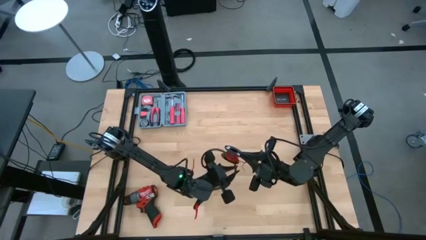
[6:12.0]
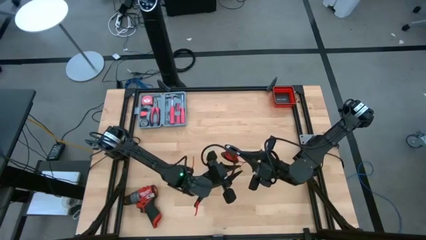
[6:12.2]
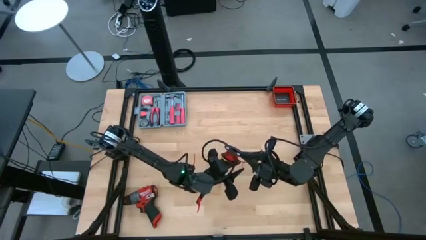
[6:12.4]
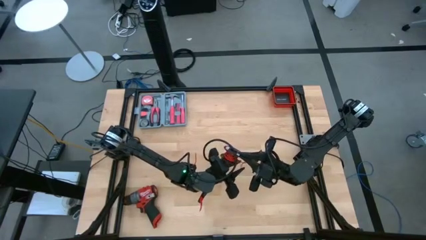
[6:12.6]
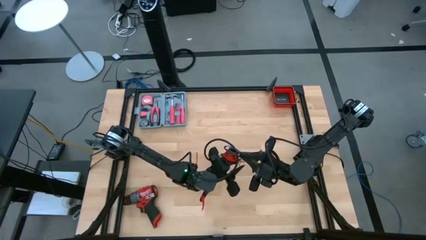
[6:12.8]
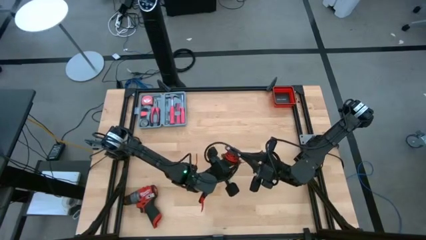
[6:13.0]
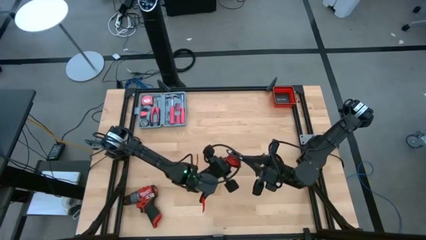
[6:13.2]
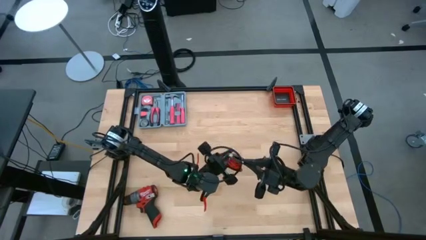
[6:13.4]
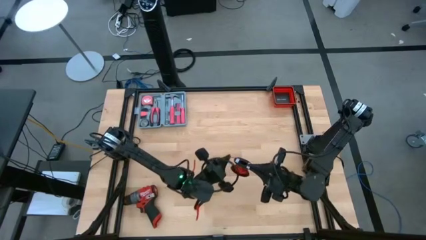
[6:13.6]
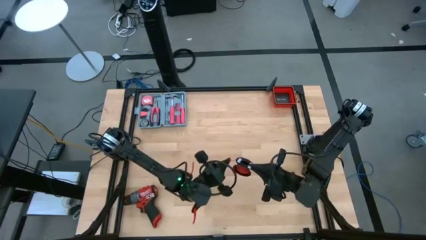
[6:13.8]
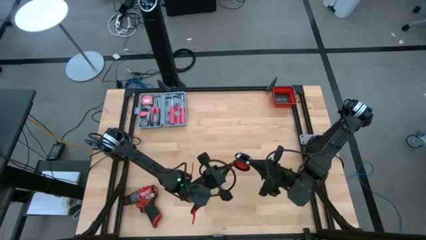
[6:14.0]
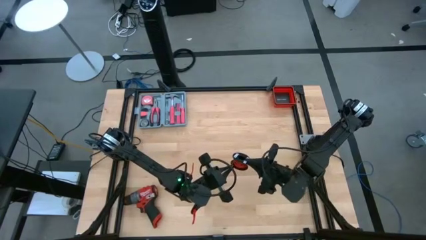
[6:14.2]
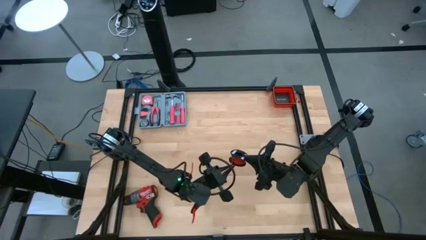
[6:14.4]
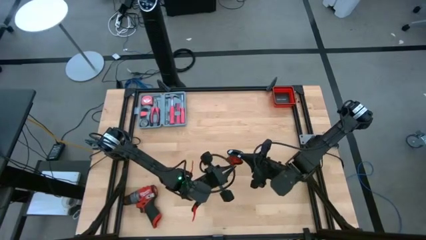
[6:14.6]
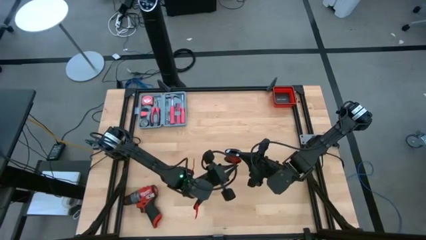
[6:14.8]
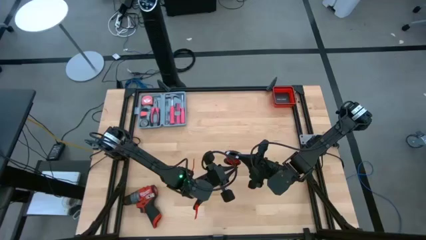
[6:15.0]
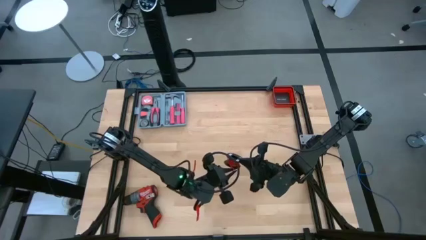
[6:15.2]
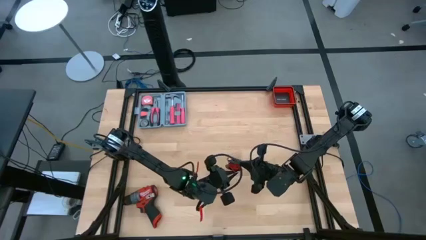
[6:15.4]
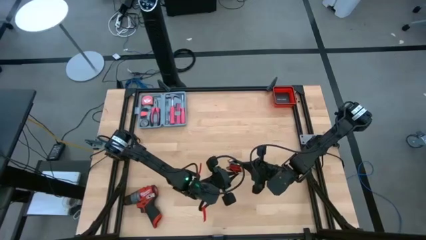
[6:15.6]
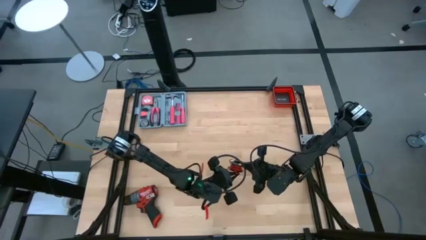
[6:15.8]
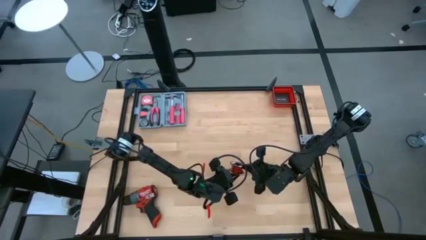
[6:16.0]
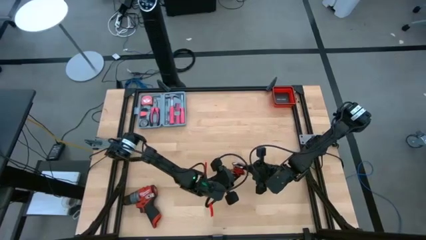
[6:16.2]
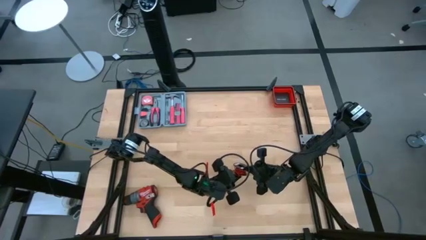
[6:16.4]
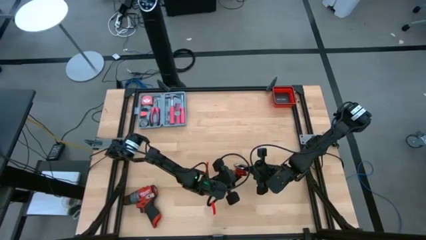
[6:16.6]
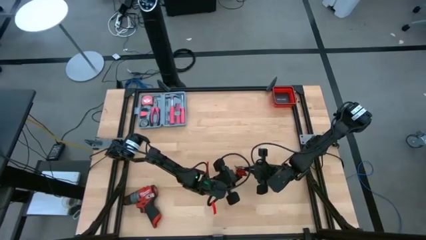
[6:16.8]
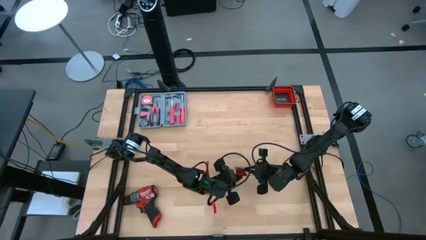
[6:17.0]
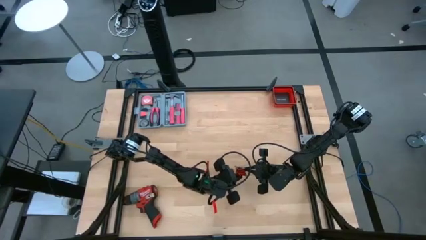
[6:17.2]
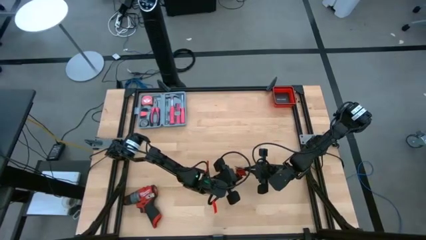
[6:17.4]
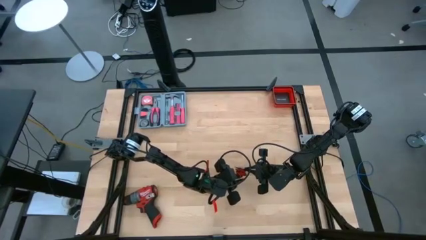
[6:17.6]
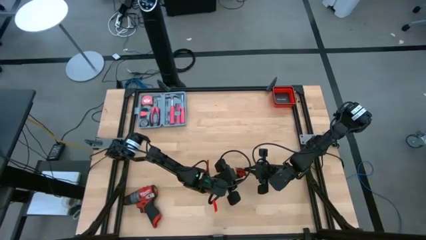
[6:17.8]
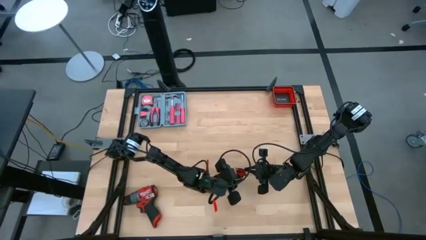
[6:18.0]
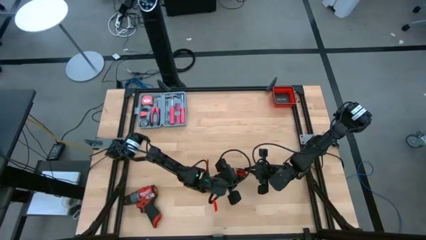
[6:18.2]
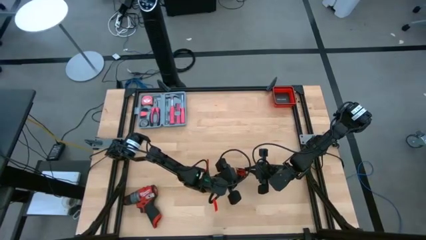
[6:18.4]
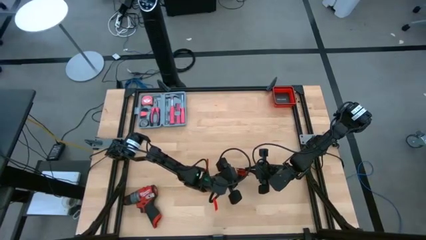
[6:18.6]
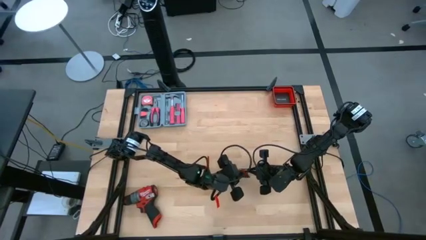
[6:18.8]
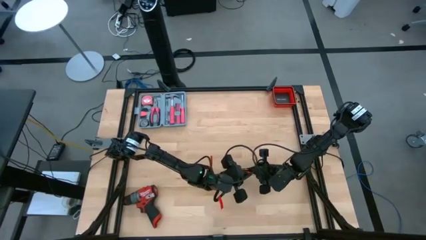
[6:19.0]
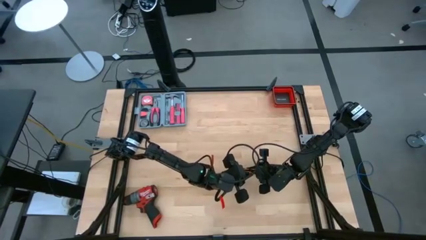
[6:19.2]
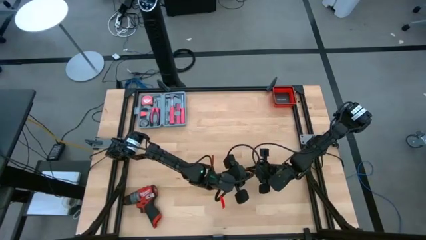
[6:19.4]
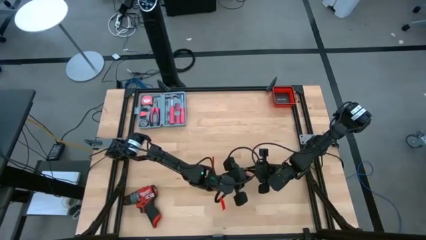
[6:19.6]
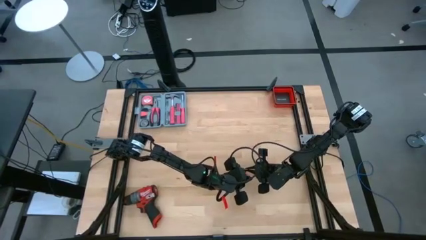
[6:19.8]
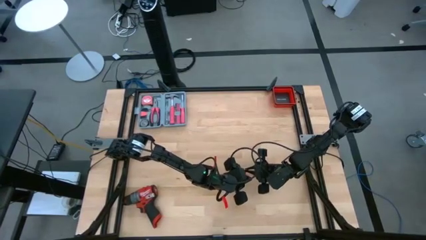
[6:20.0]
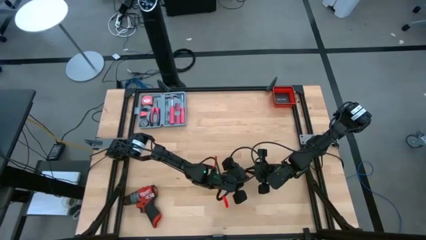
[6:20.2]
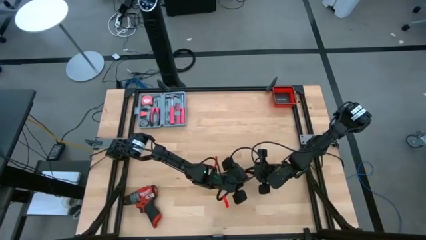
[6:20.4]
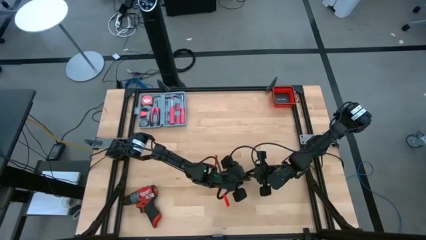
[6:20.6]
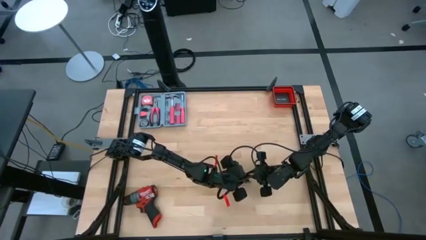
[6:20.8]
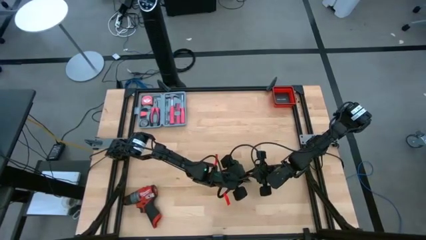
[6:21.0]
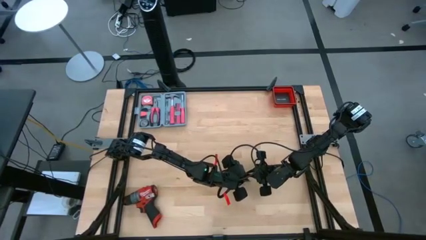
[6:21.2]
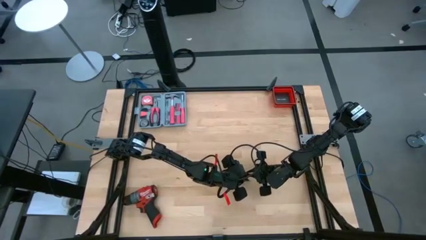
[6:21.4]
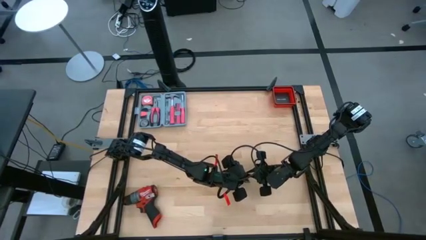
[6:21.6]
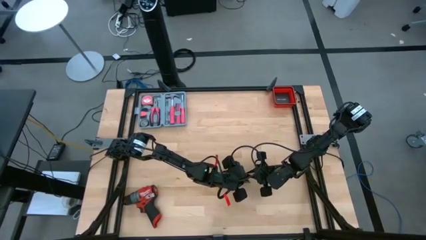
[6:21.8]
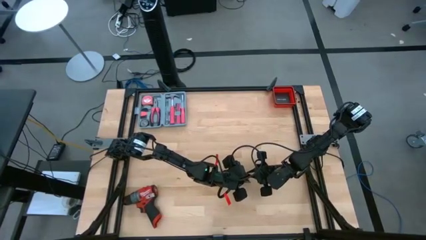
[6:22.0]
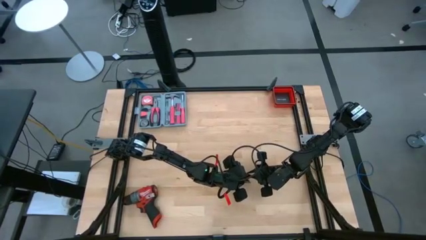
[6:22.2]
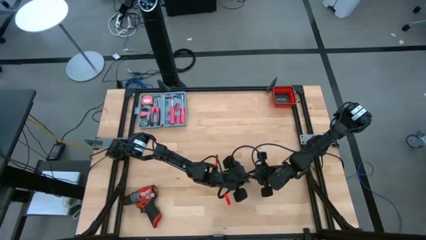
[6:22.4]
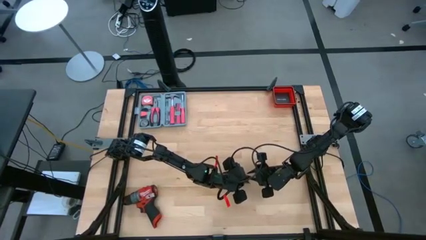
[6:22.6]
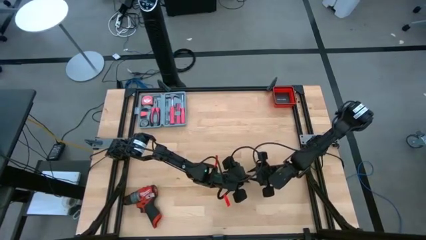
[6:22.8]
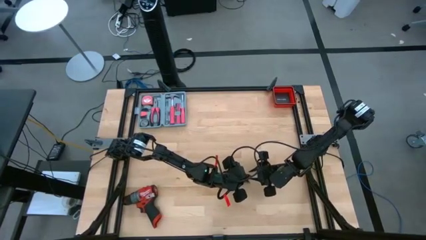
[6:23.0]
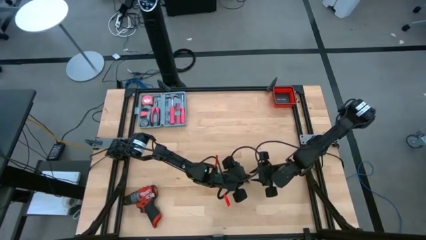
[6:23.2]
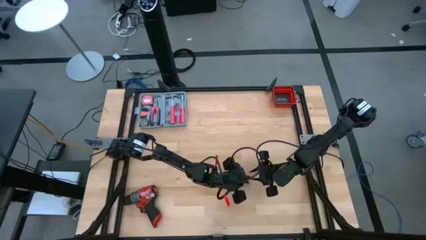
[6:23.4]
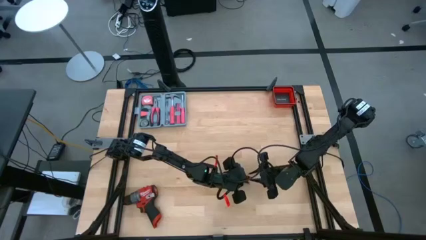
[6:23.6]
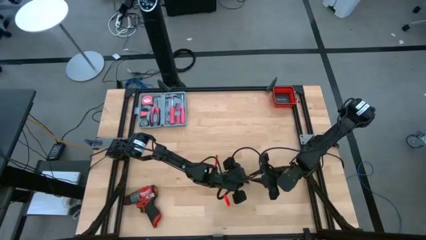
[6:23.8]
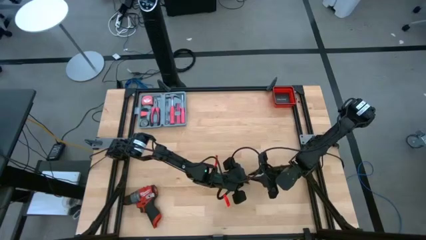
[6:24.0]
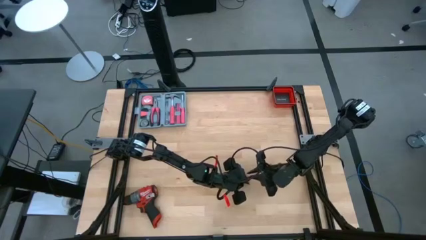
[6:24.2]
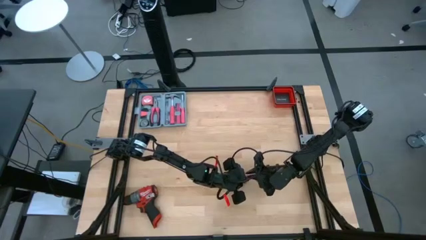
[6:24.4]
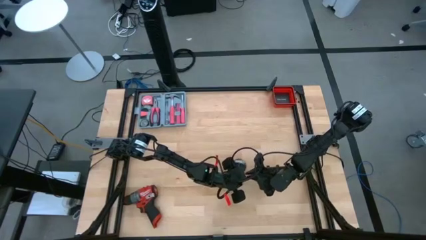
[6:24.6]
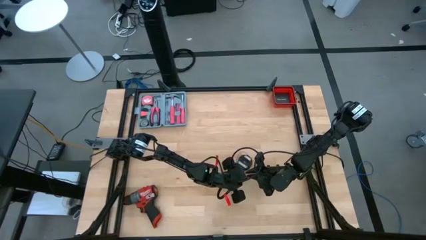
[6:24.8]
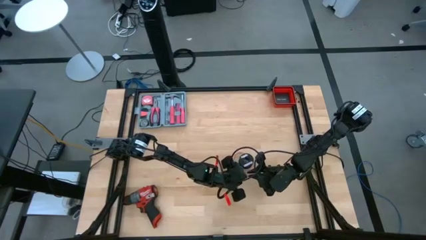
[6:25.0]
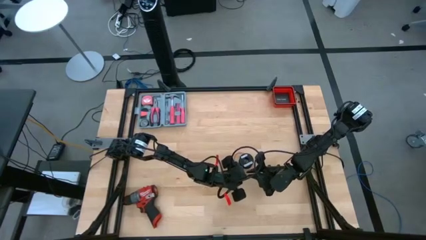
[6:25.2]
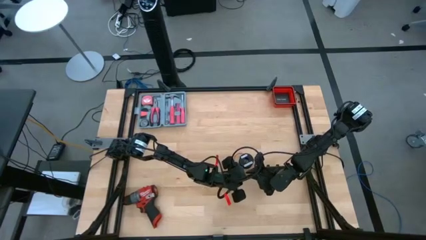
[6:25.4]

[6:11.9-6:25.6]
Task: Coil cords
Coil the red wire on the black spool
